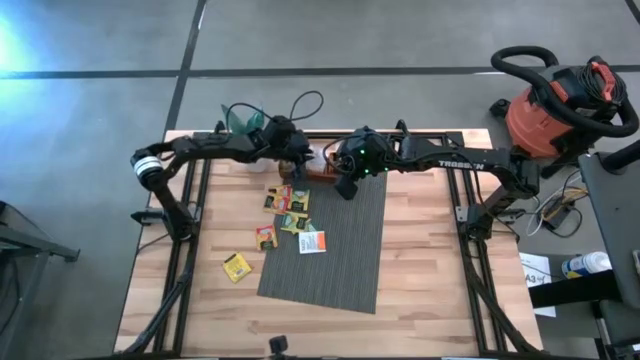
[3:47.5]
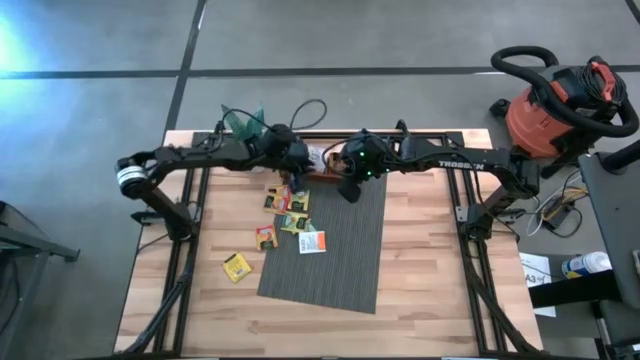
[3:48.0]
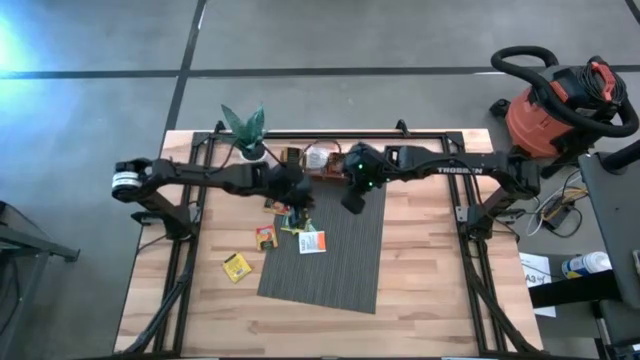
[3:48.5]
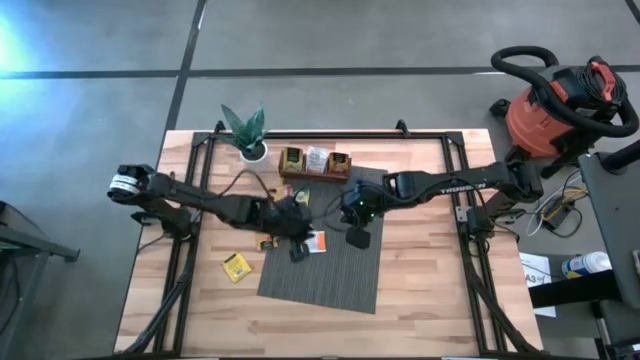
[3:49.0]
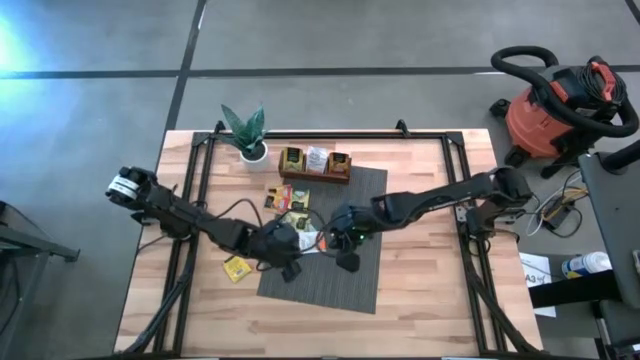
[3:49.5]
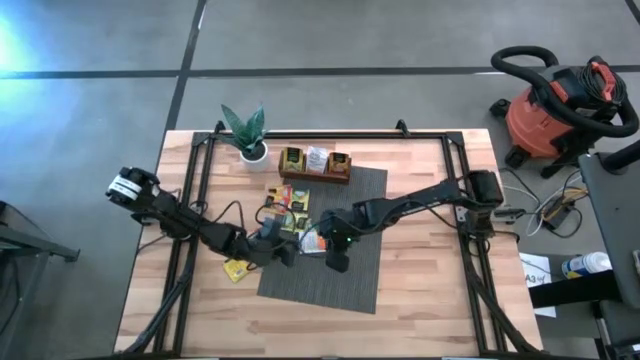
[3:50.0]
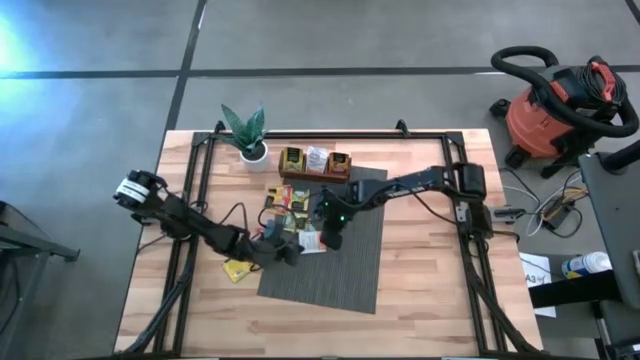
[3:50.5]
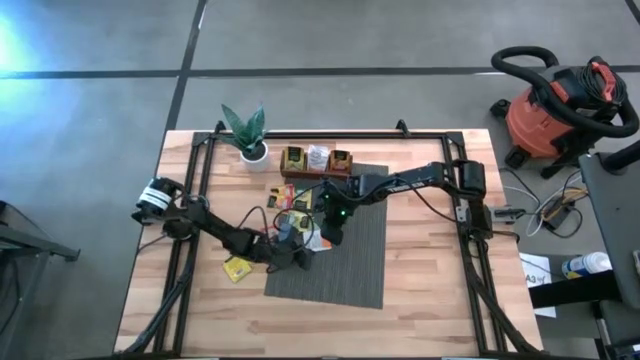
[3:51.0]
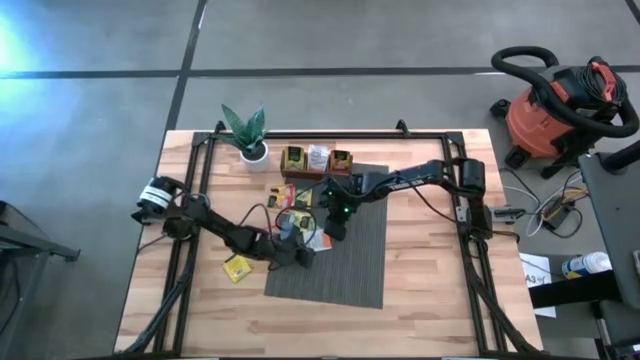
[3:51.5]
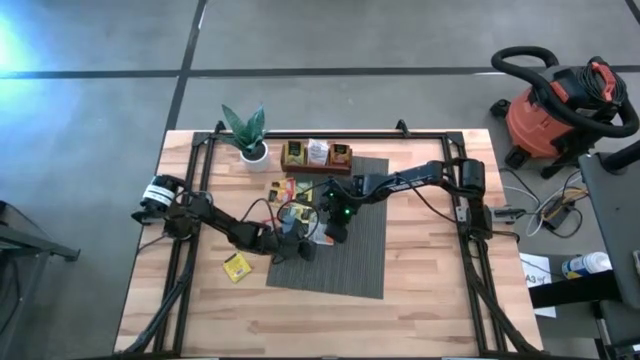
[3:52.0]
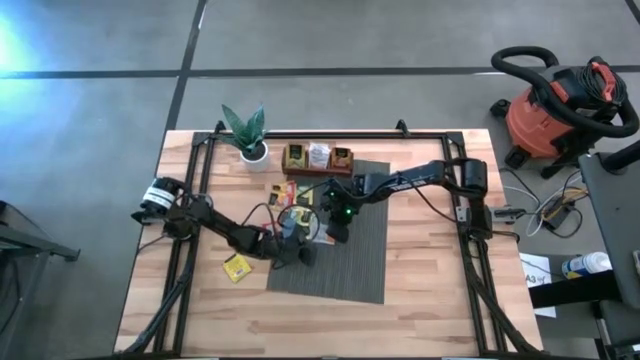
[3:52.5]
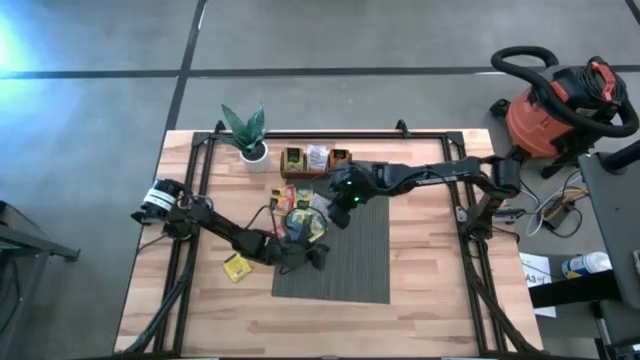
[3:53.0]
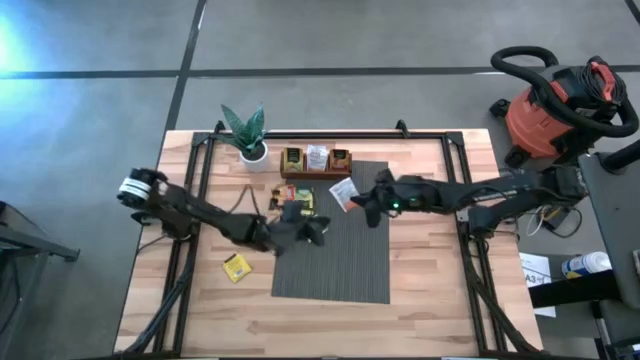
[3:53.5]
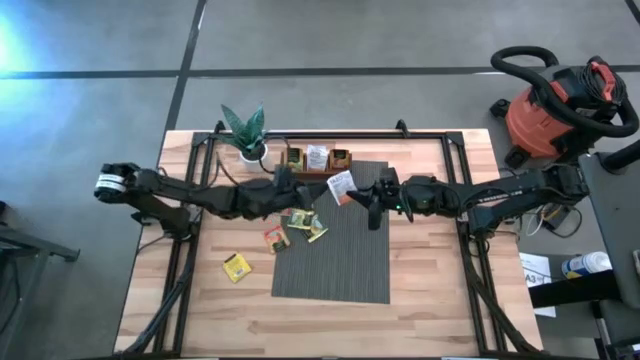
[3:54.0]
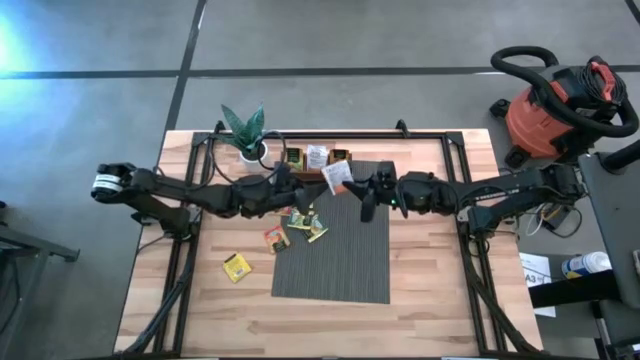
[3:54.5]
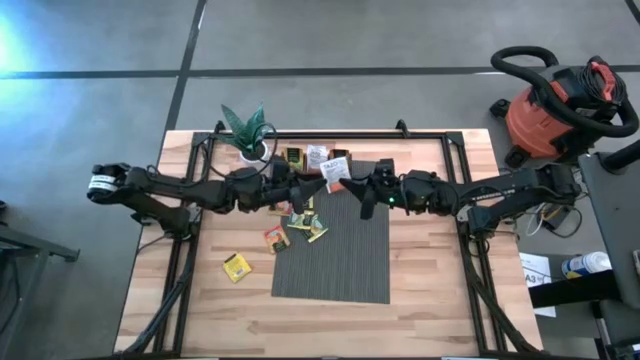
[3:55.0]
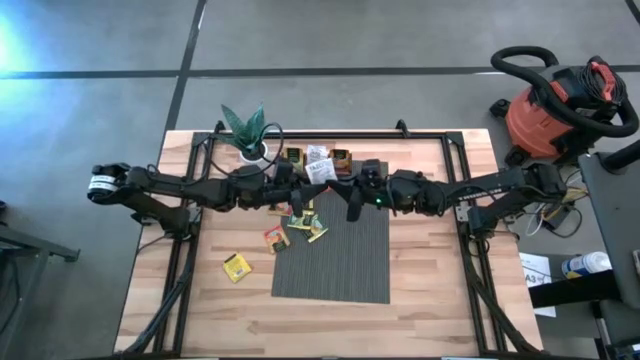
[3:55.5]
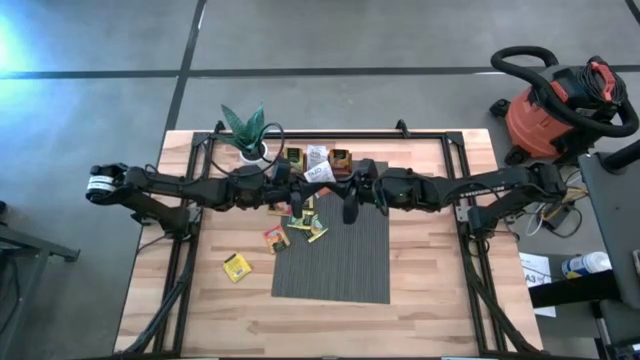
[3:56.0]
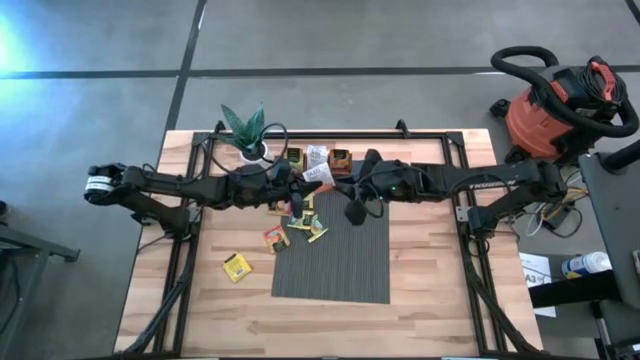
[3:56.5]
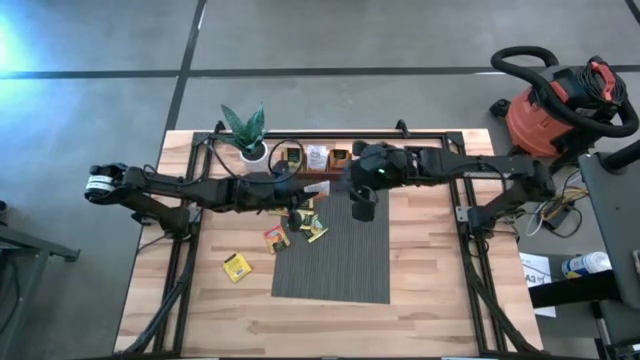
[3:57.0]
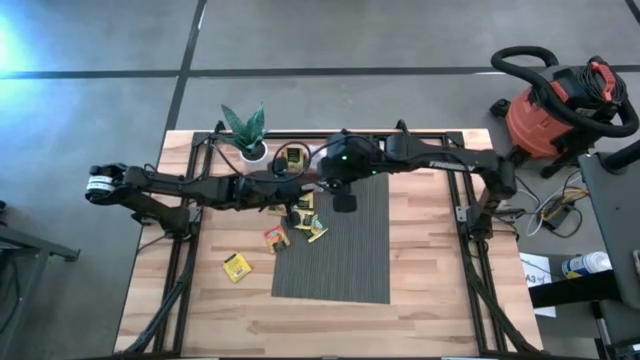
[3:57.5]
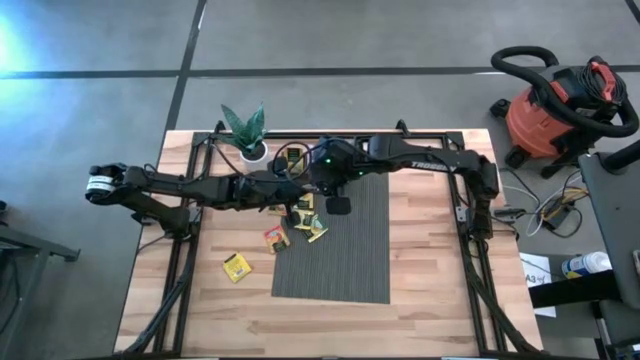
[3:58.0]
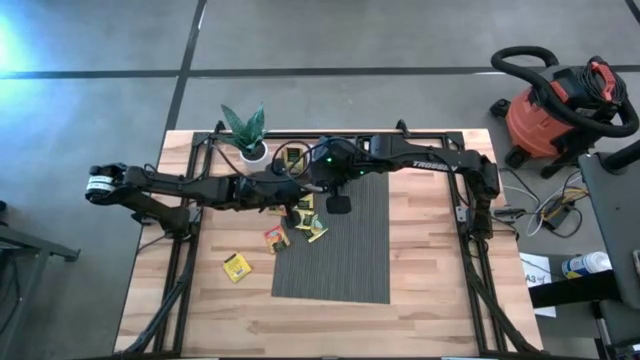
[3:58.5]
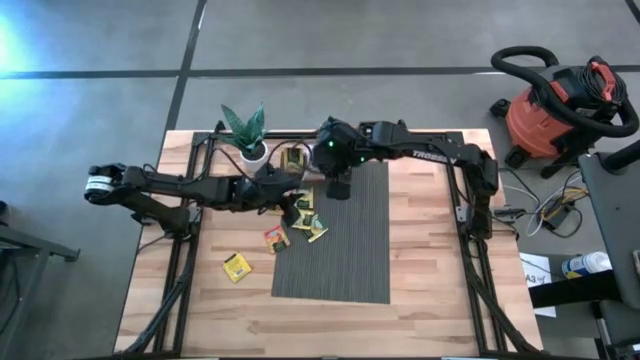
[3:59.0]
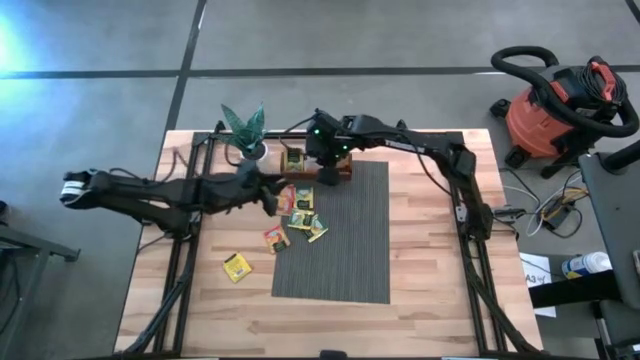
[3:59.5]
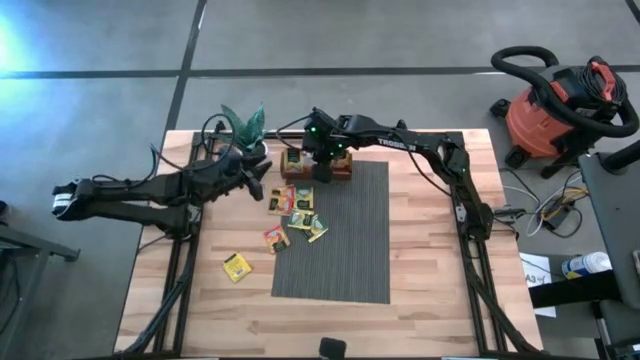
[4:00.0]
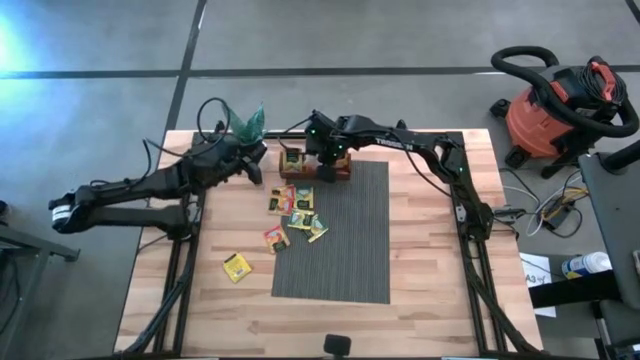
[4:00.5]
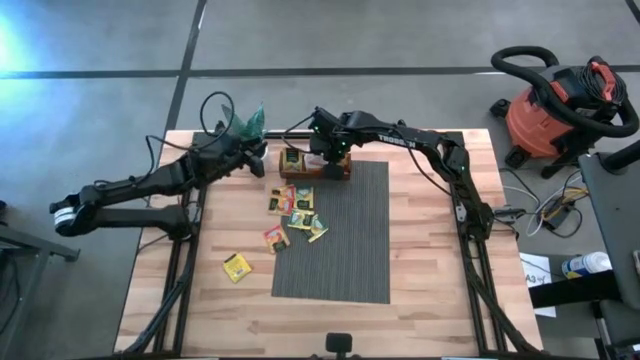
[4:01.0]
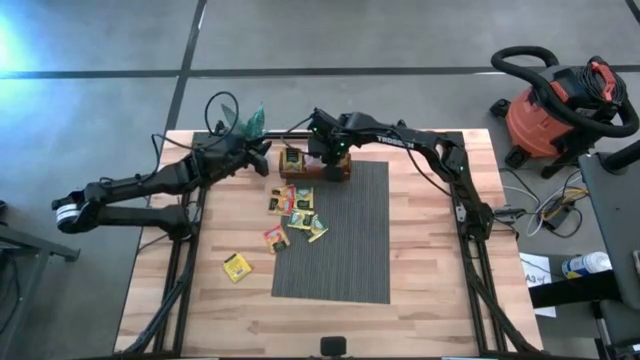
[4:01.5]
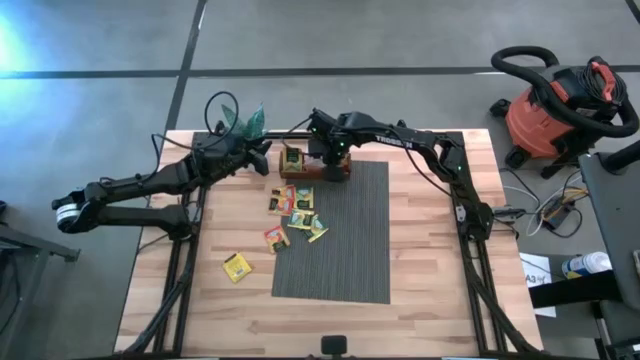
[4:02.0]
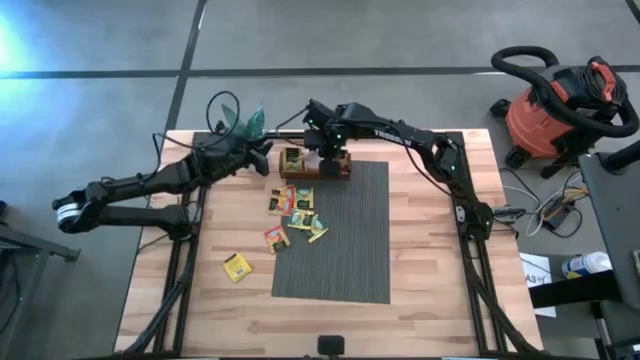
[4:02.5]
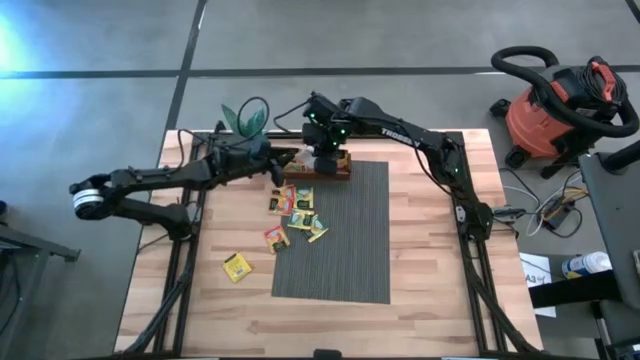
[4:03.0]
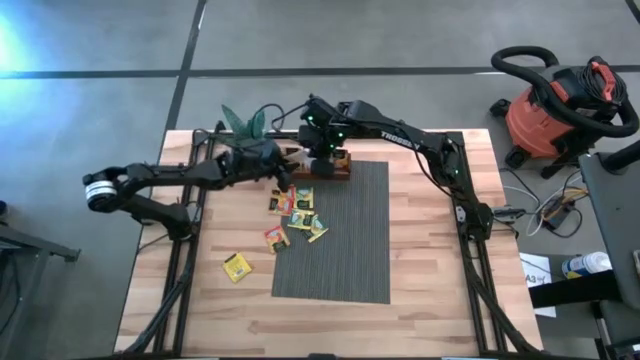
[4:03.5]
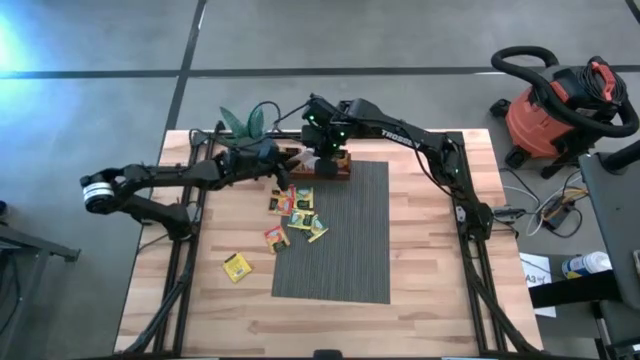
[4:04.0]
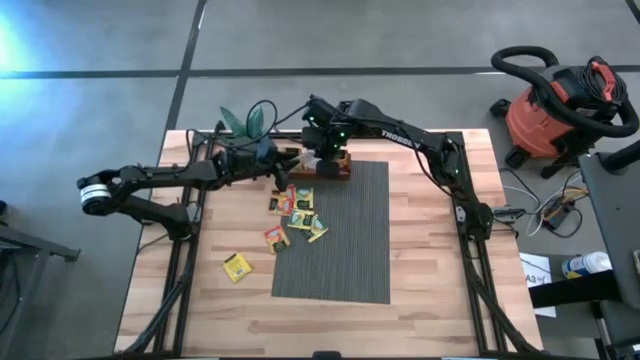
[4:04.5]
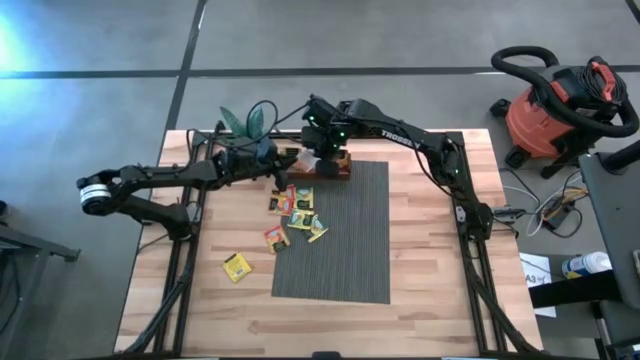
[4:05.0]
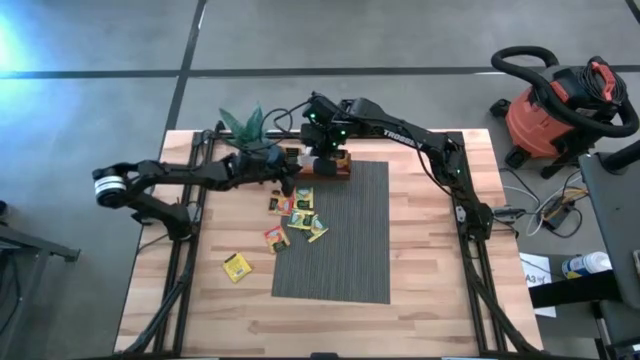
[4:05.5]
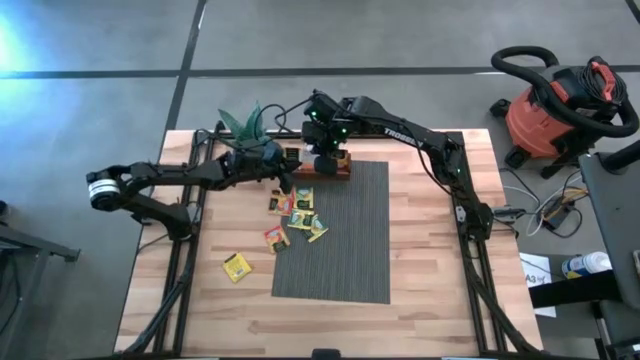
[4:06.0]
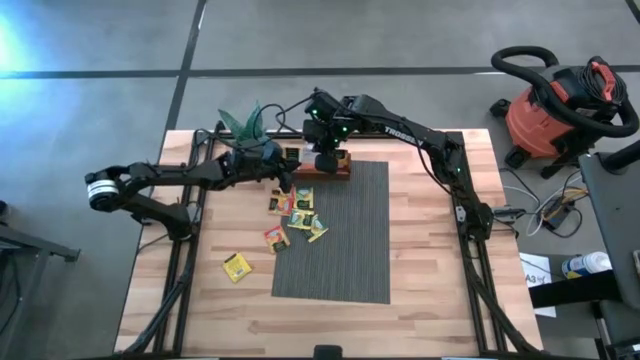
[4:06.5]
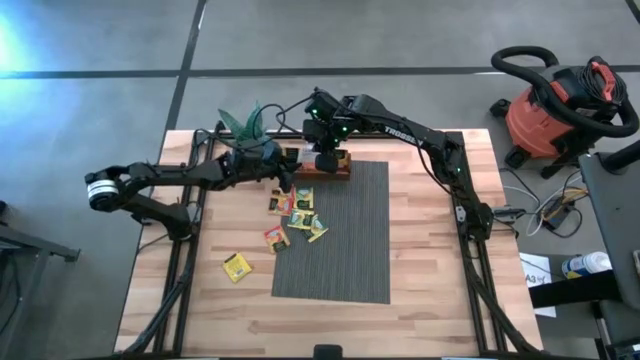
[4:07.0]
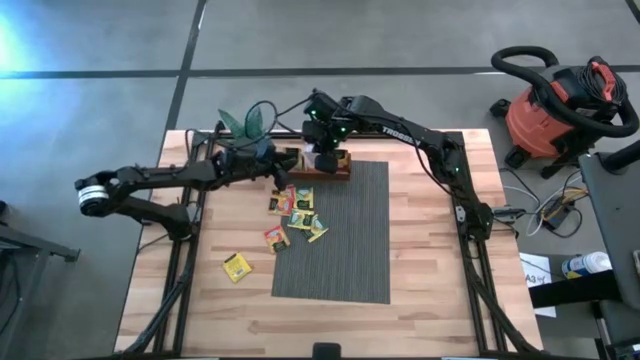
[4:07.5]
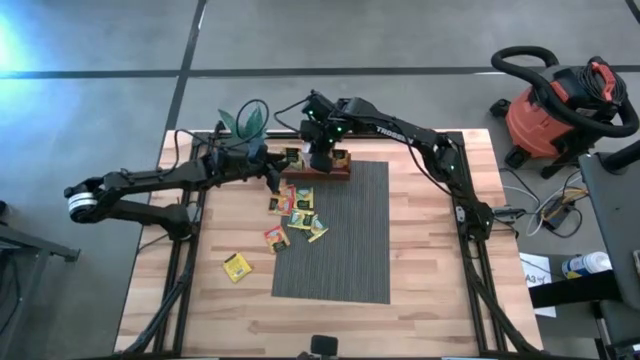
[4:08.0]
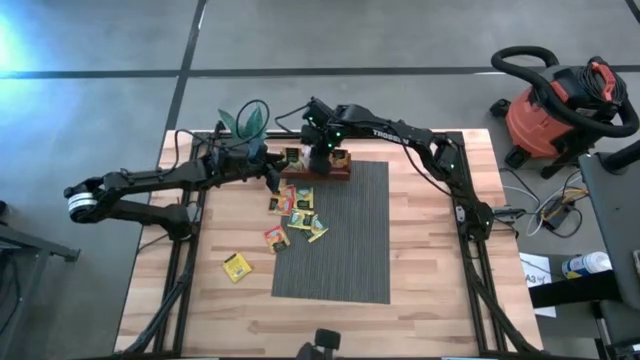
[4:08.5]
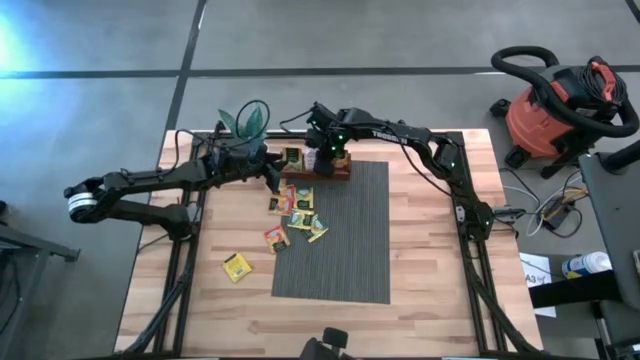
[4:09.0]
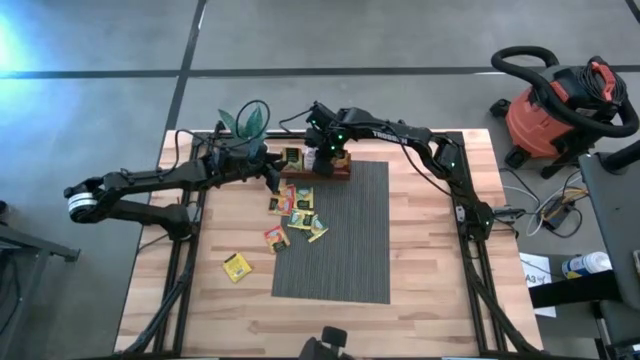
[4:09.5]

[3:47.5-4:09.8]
Task: Pick & Place Tea
Put the white tea bag into the middle compartment of the wooden organizer
